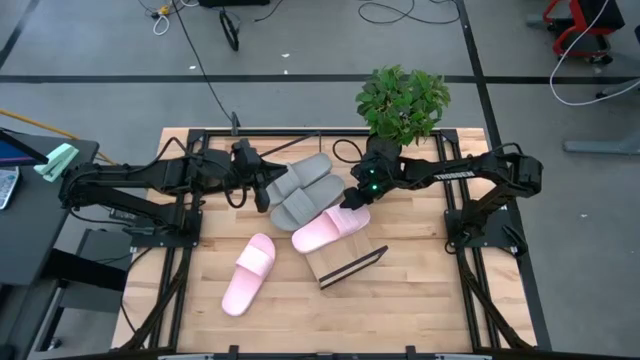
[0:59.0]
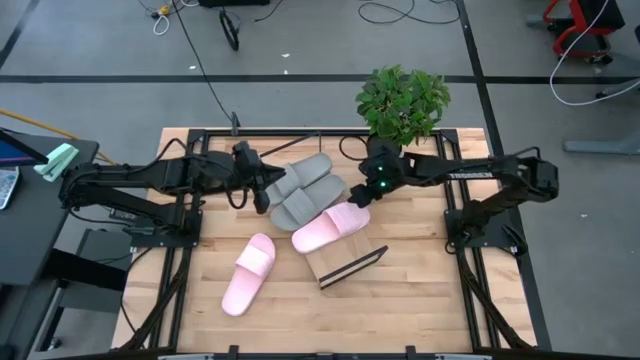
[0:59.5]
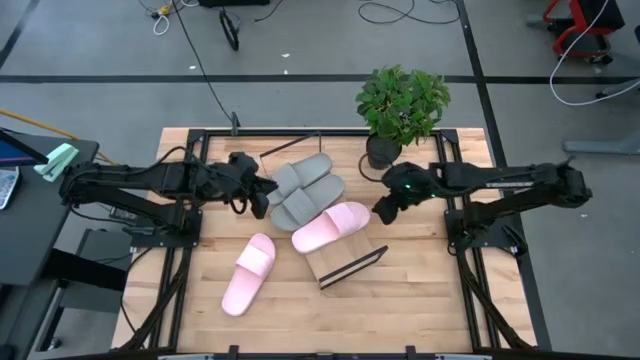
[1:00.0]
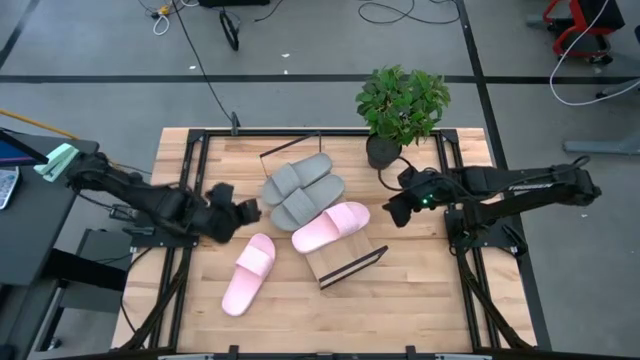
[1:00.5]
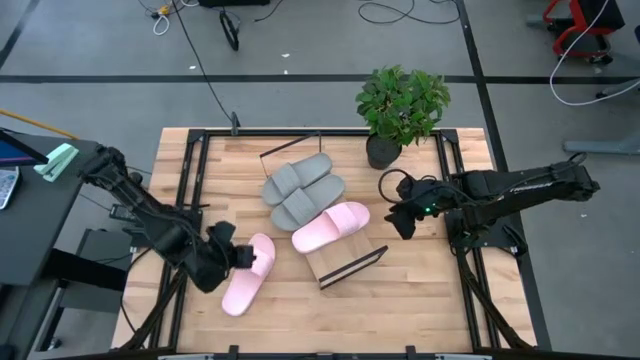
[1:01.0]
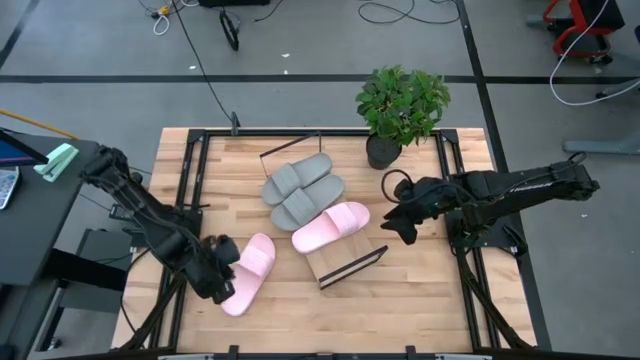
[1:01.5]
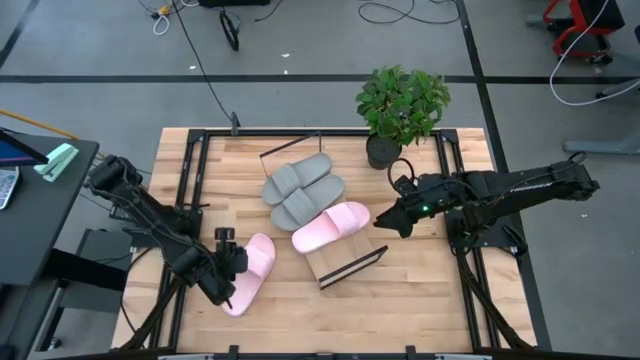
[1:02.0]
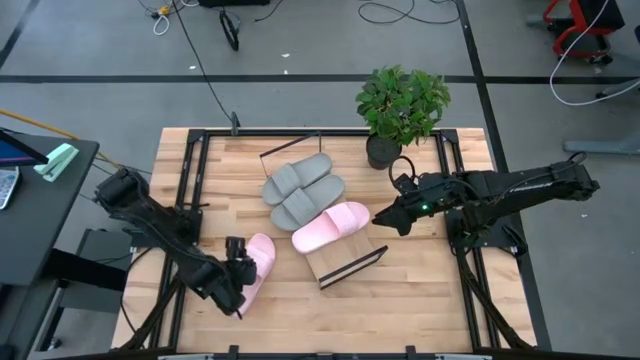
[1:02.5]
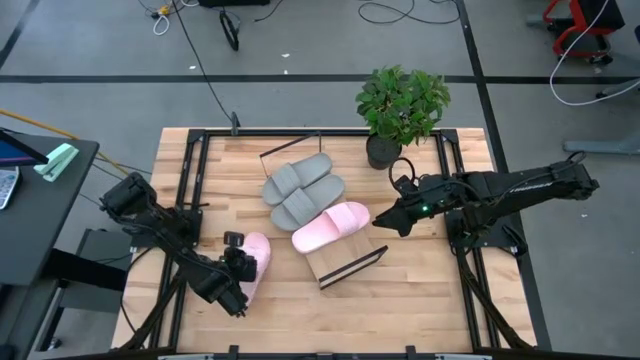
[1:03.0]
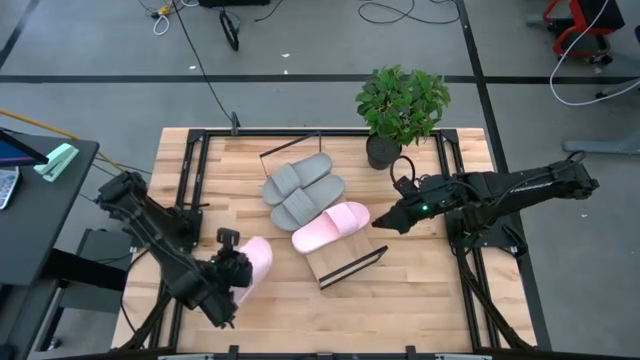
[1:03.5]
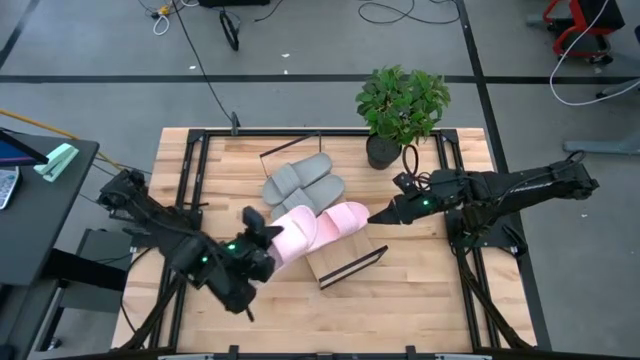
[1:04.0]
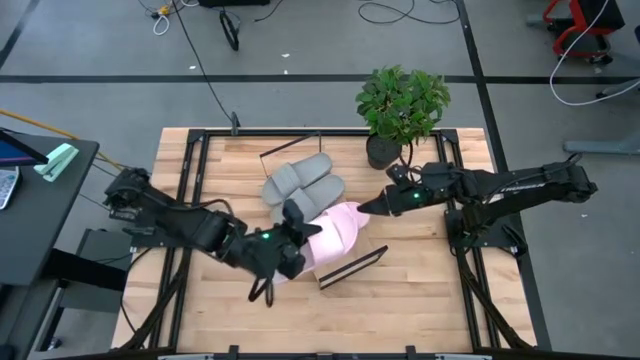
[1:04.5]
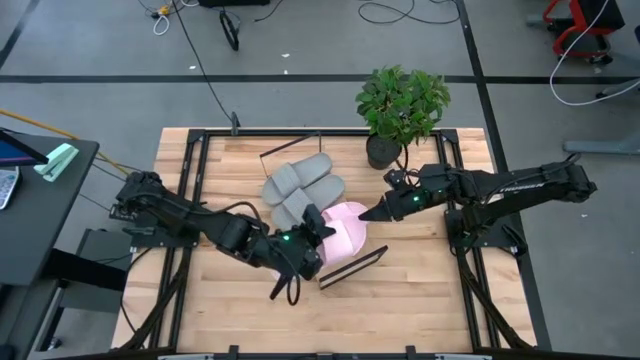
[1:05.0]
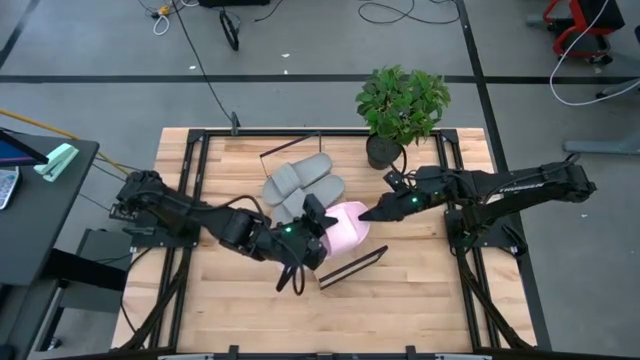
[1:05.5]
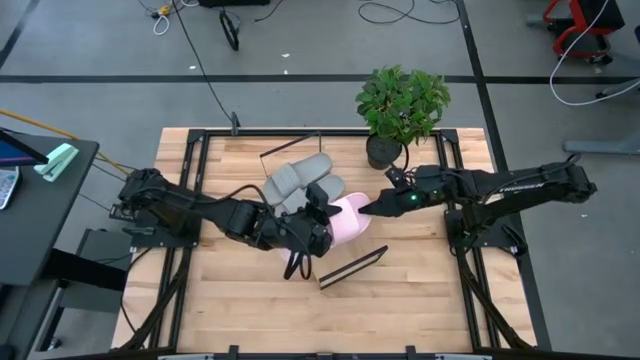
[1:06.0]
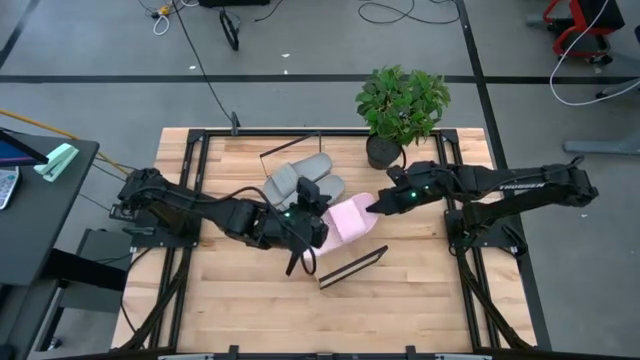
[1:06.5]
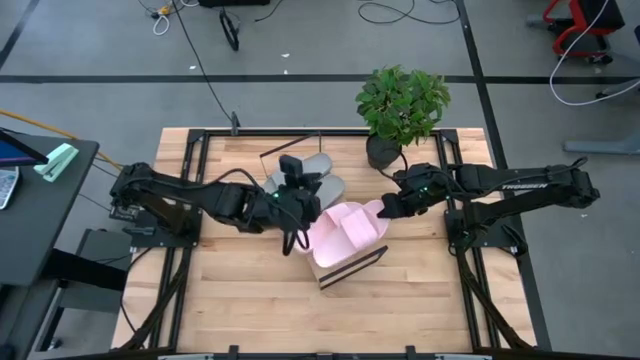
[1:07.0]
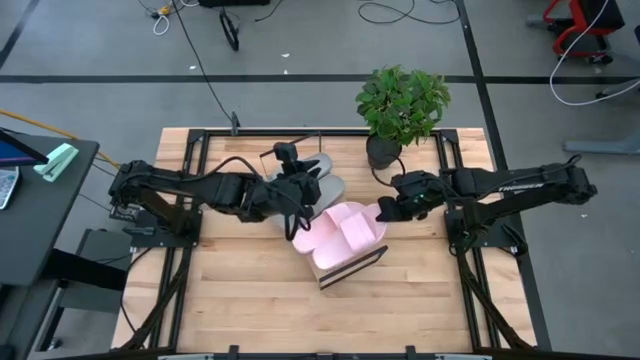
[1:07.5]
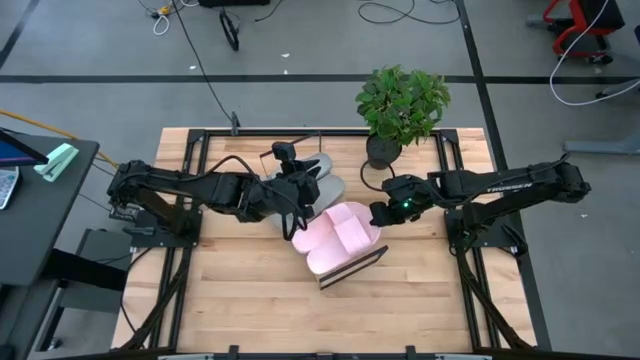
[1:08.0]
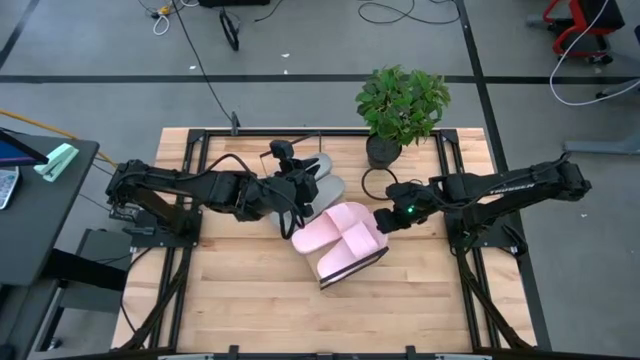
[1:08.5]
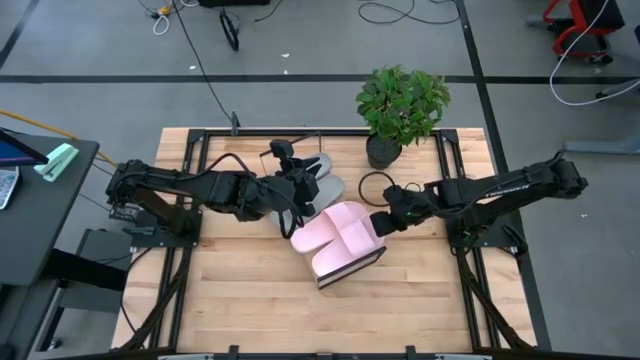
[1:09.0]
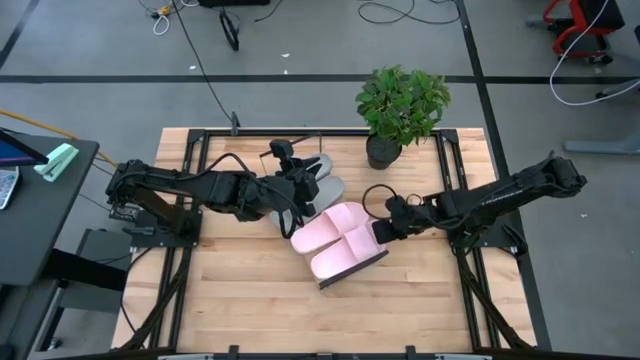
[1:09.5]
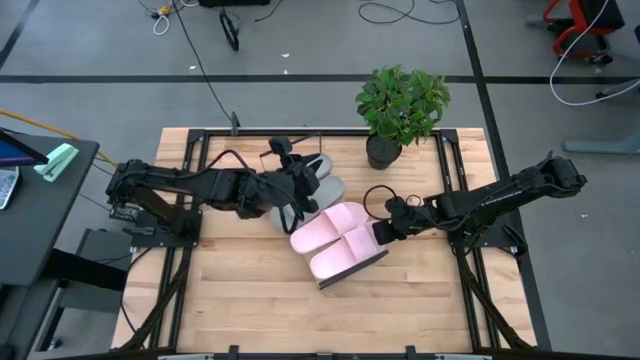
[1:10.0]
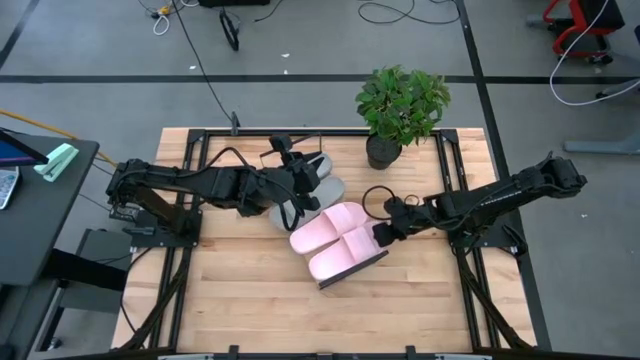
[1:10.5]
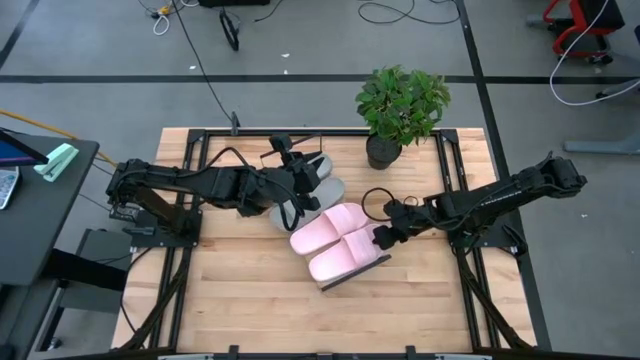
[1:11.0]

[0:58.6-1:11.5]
Task: Pick and place slides into the shelf
Put the pink slides on the shelf

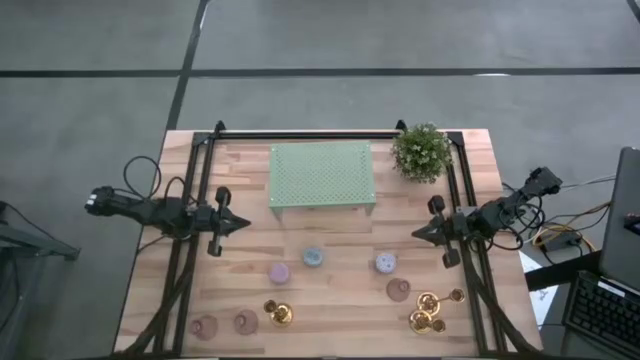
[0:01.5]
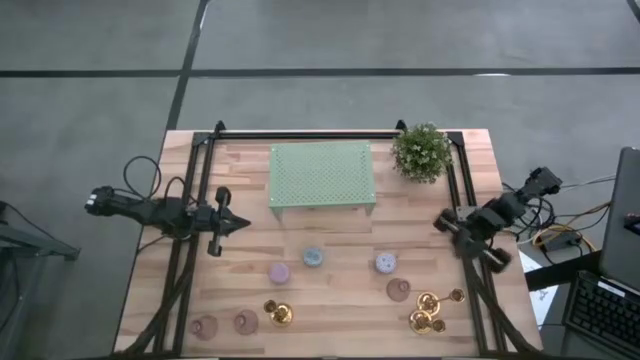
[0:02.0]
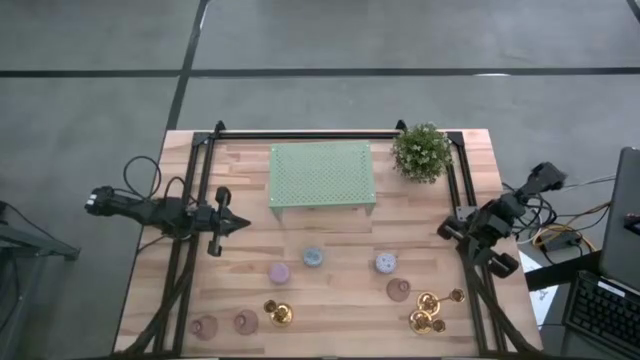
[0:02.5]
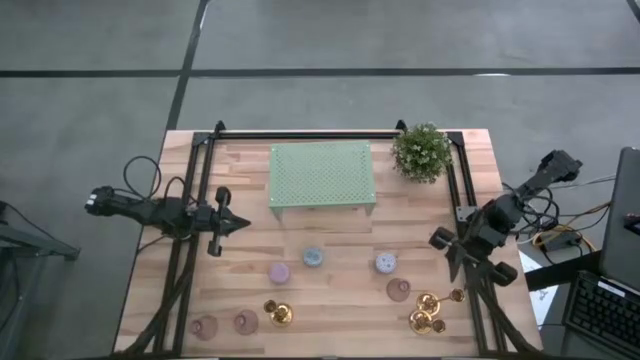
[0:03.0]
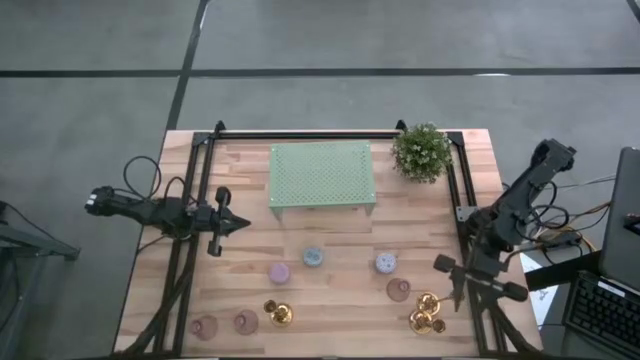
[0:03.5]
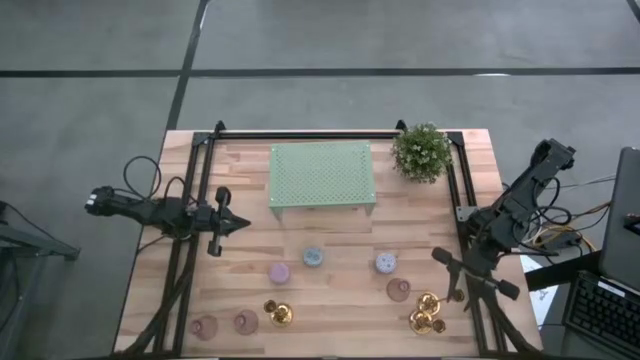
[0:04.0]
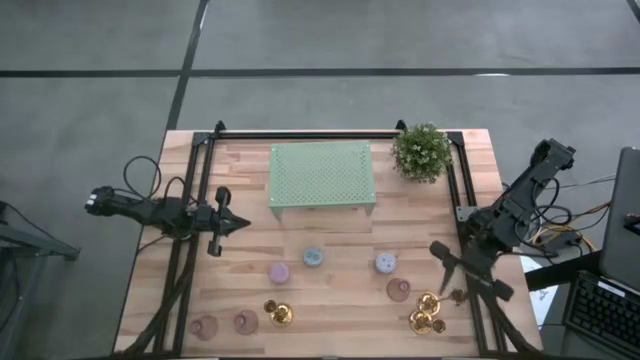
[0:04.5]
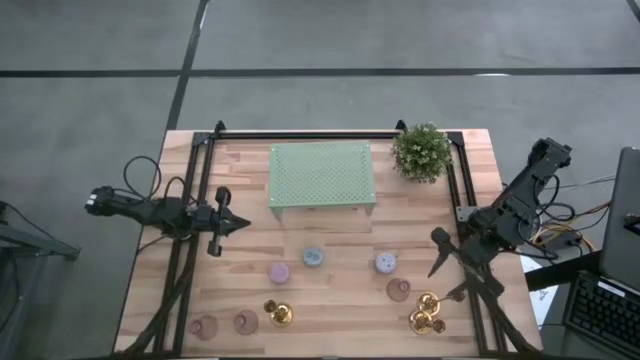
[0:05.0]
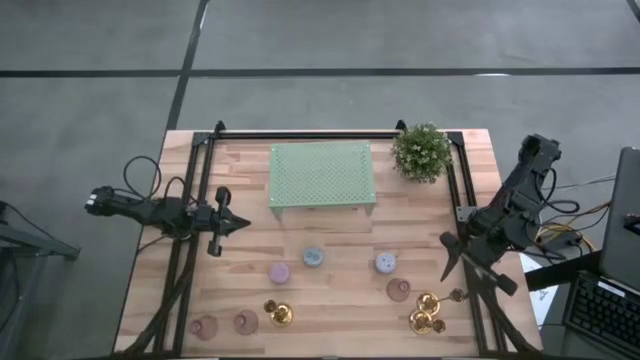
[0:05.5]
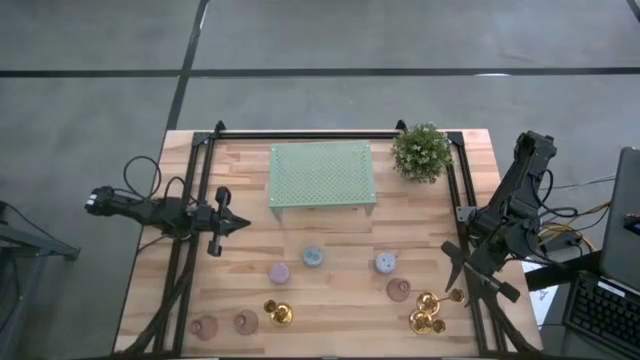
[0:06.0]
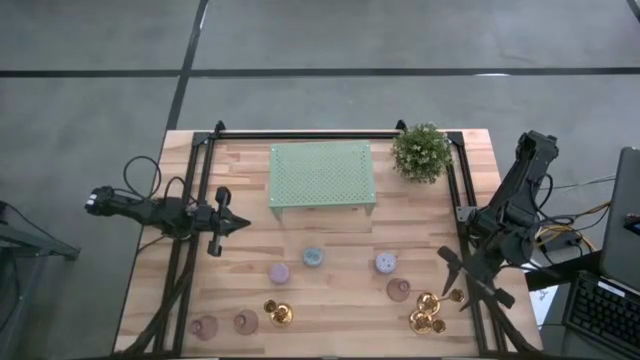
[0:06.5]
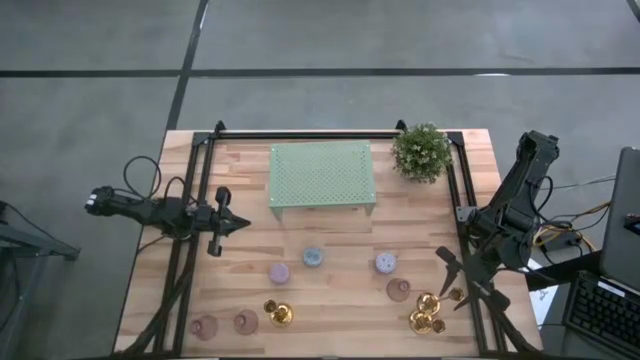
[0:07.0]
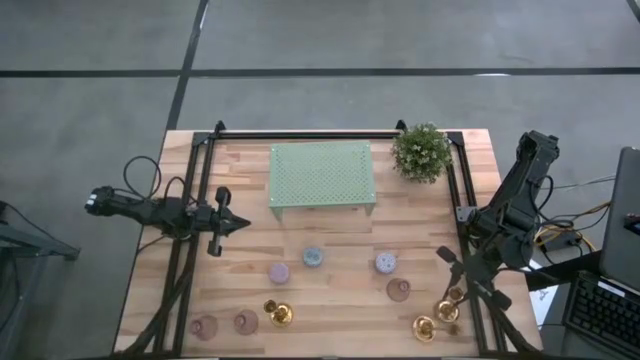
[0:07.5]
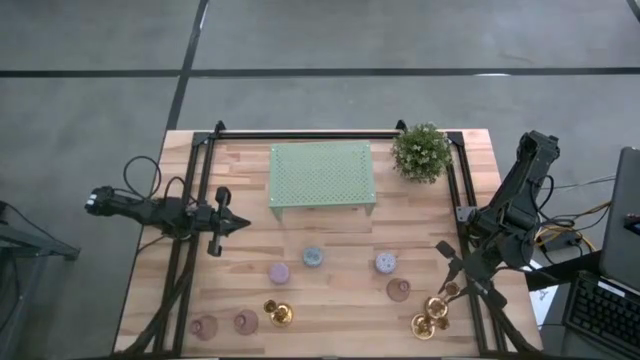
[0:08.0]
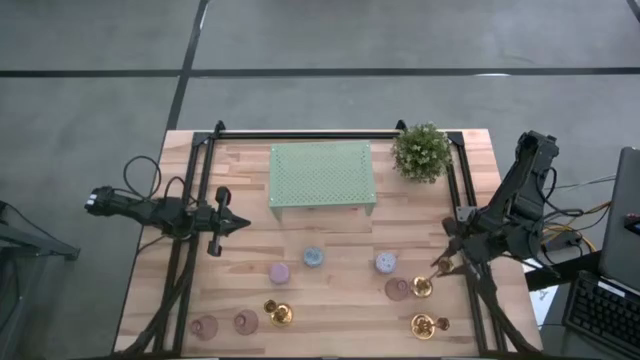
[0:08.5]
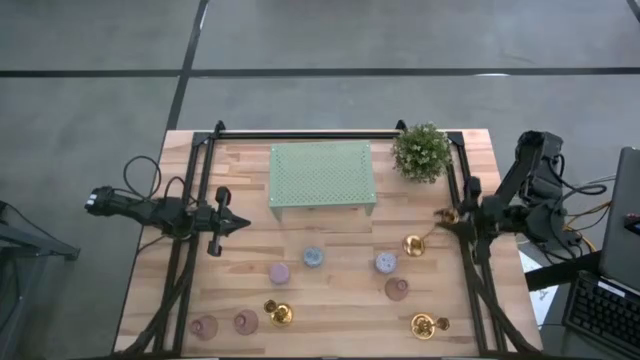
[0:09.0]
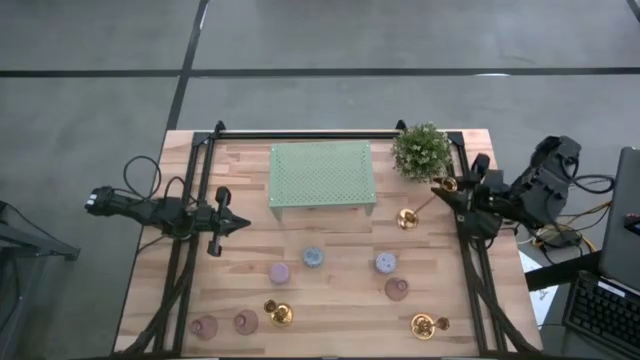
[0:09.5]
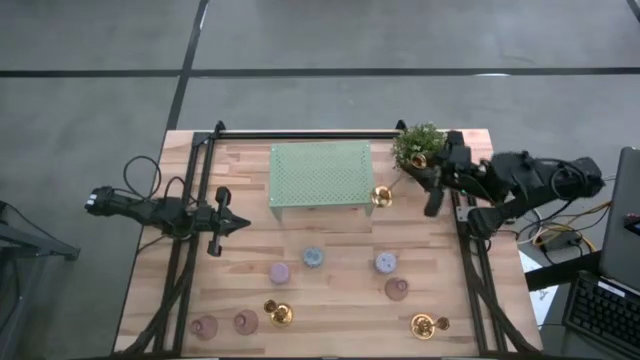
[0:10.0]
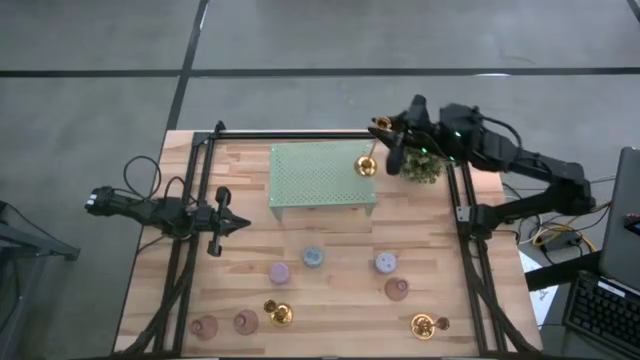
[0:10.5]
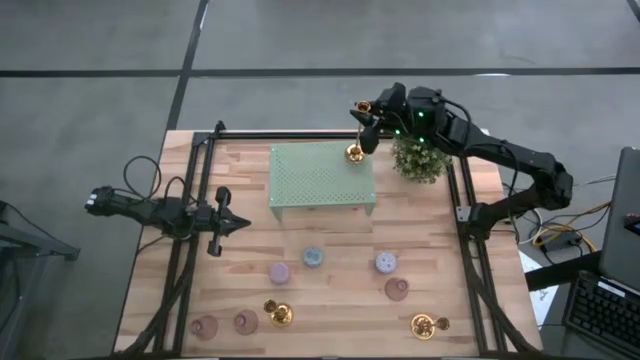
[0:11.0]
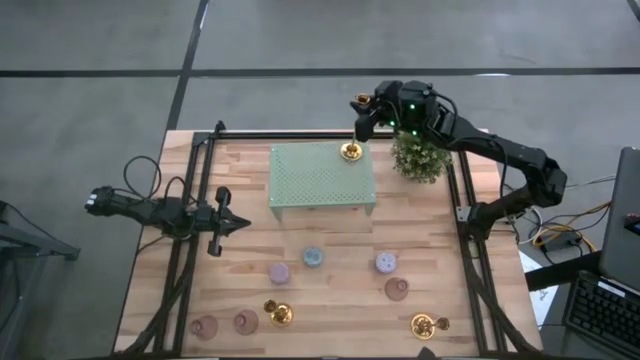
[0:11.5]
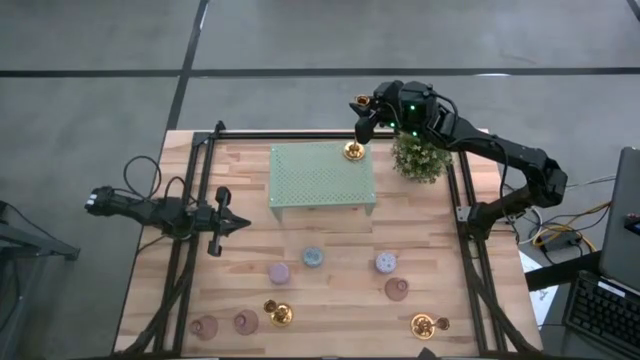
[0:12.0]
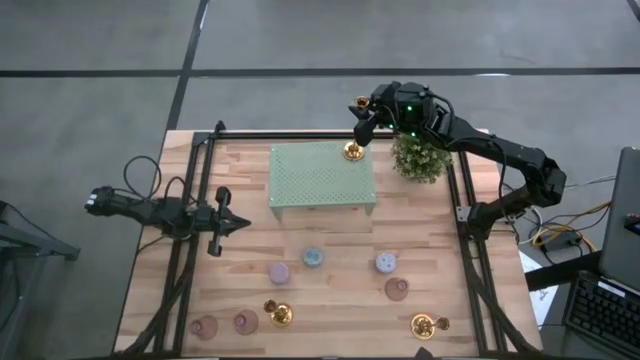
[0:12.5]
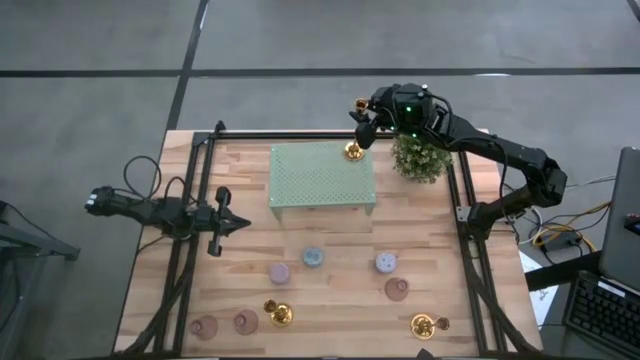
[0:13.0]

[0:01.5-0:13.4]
Task: Pick & Place candle stick holders
Put the top right gold candle holder on the shelf
